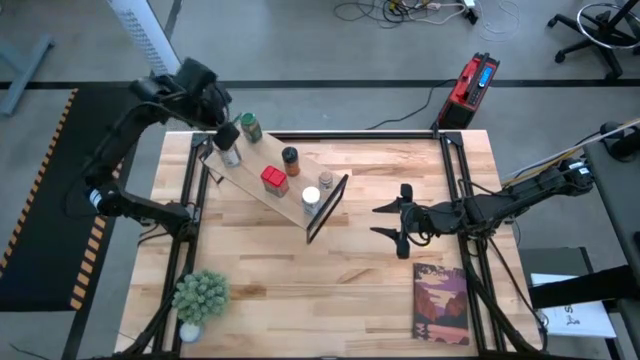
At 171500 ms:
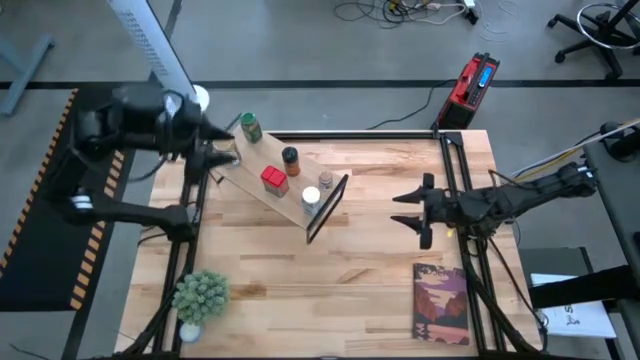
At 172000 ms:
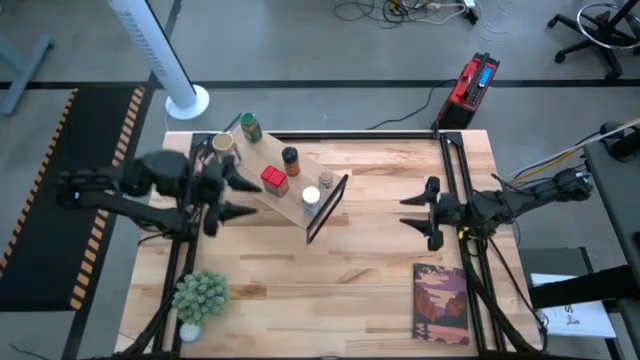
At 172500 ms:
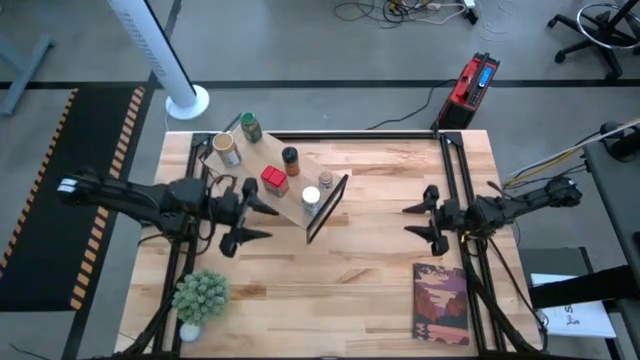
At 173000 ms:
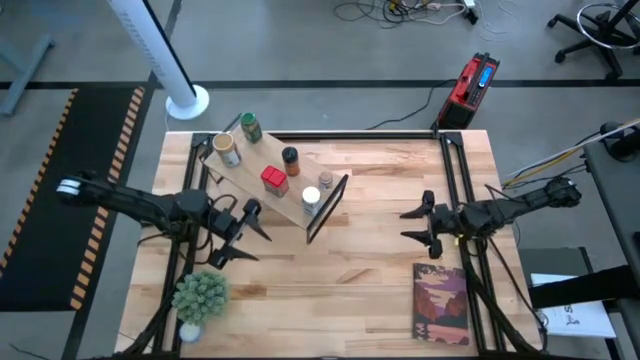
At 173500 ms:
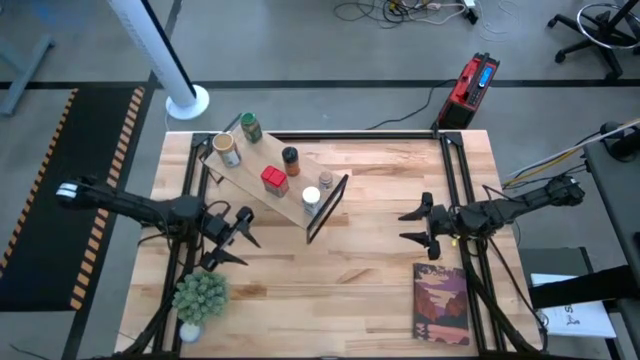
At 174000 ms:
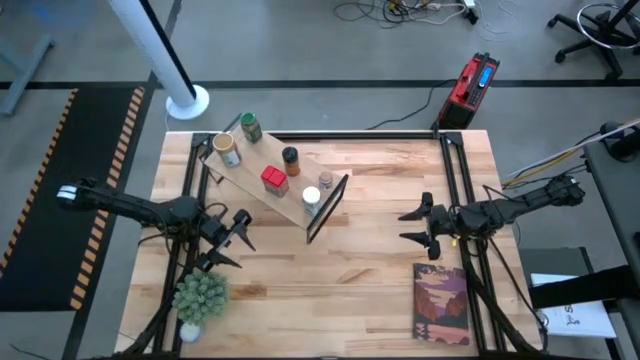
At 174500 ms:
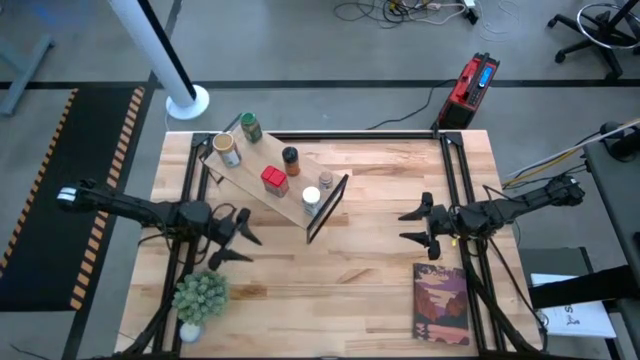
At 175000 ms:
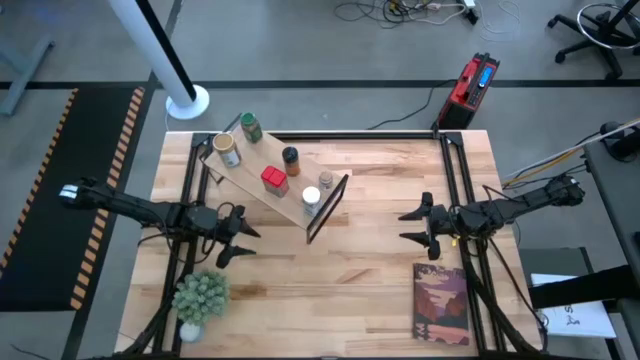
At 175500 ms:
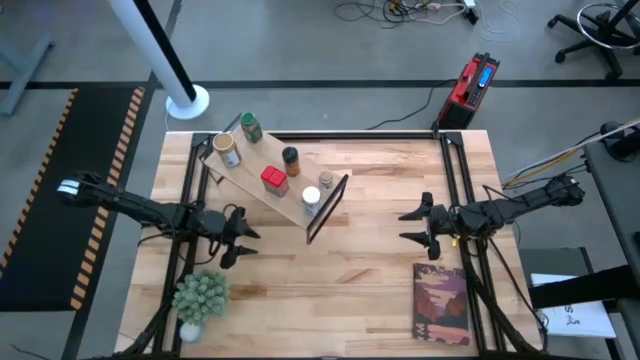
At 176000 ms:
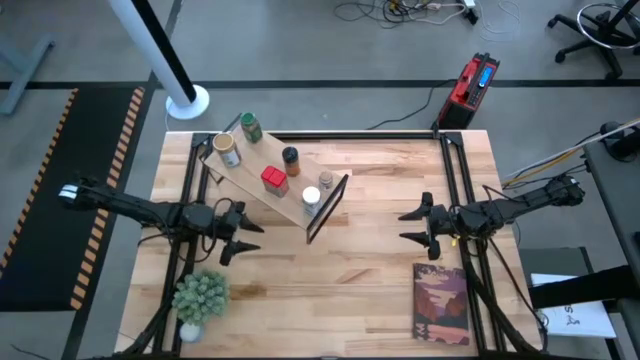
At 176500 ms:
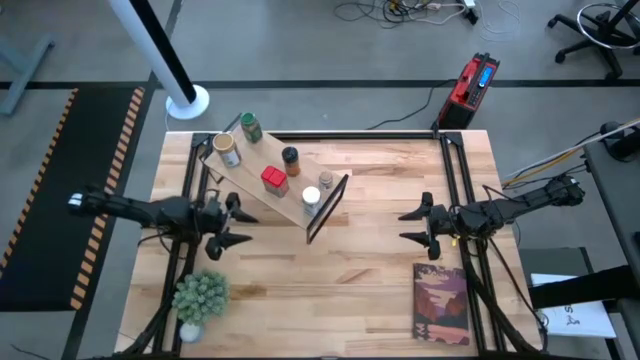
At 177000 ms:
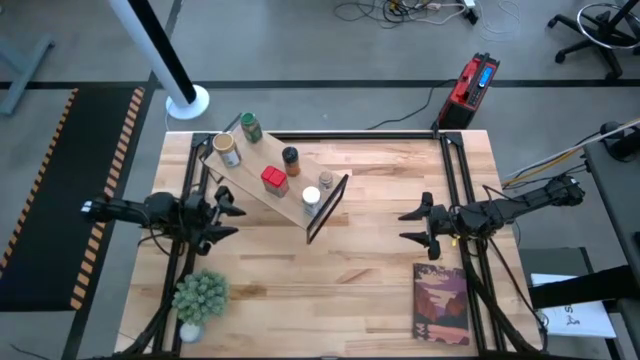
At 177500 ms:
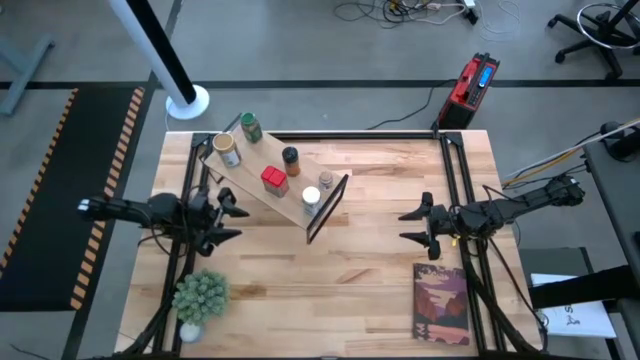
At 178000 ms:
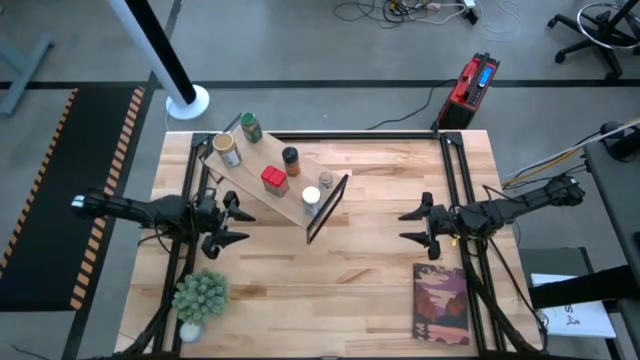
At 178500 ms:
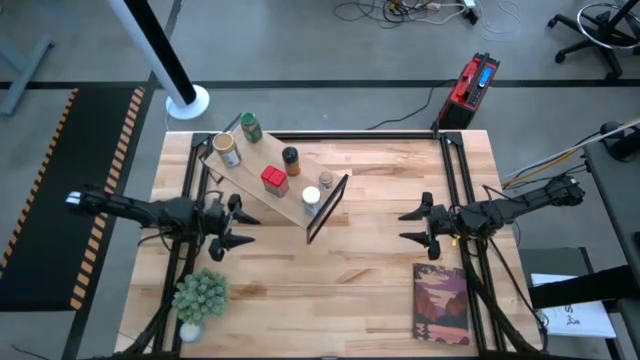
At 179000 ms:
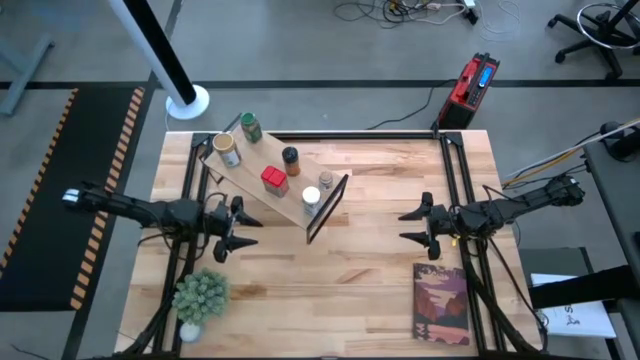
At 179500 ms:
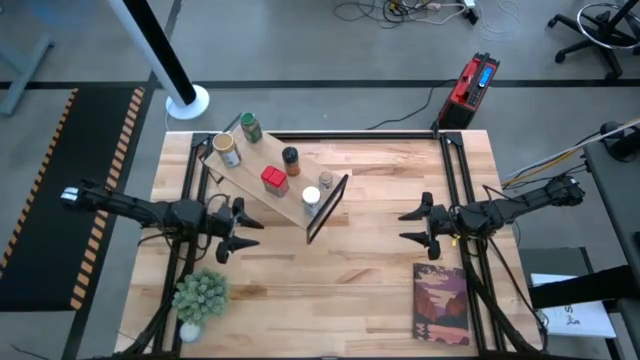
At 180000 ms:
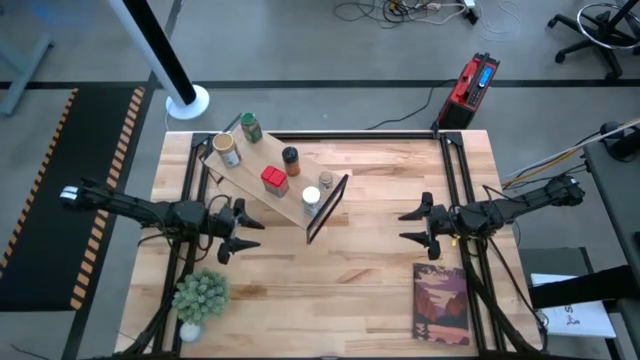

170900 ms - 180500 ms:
Task: Shelf spices
Return to Home Position

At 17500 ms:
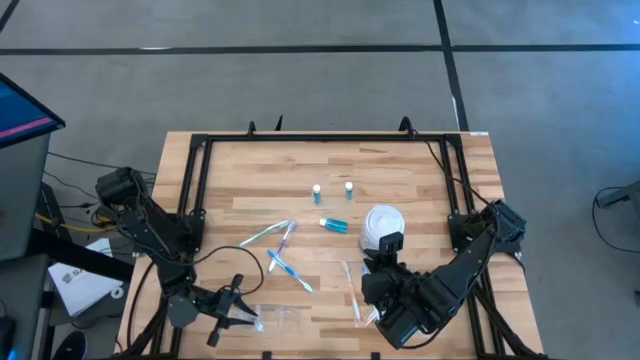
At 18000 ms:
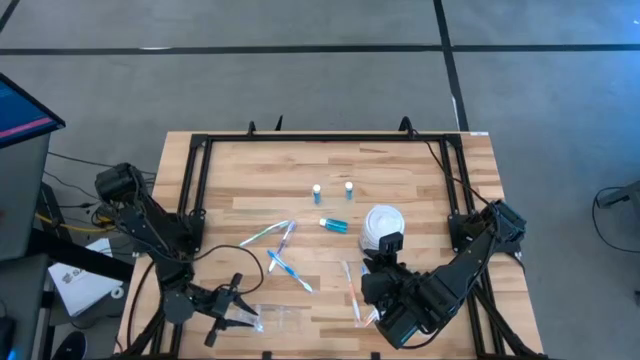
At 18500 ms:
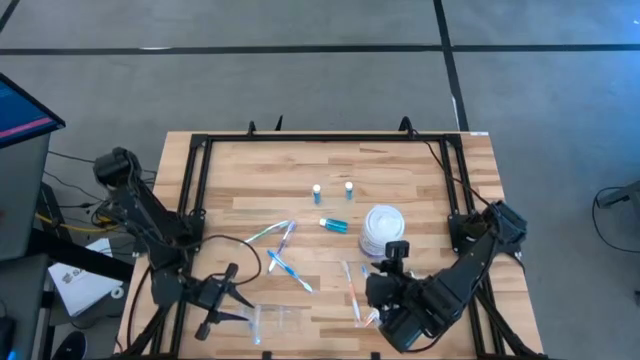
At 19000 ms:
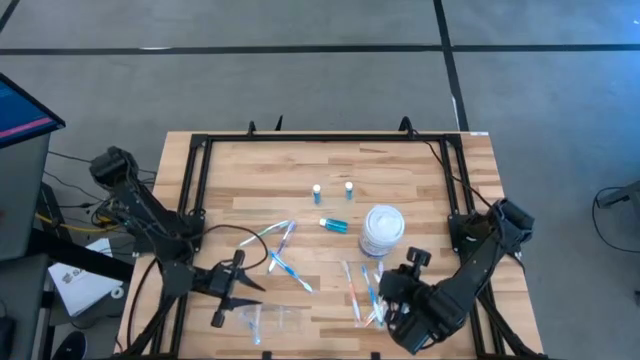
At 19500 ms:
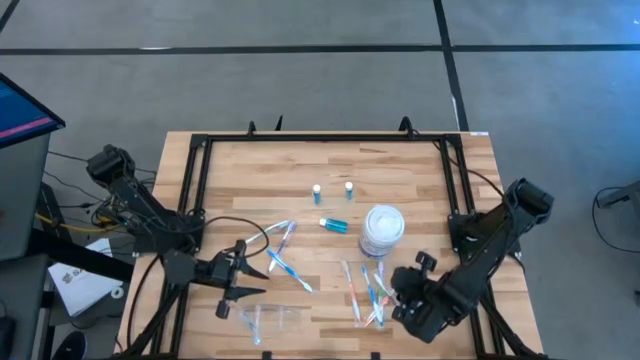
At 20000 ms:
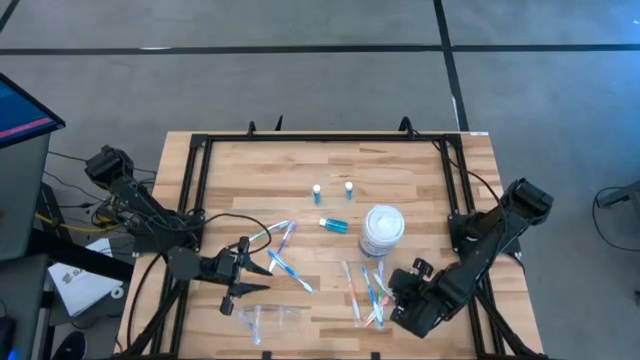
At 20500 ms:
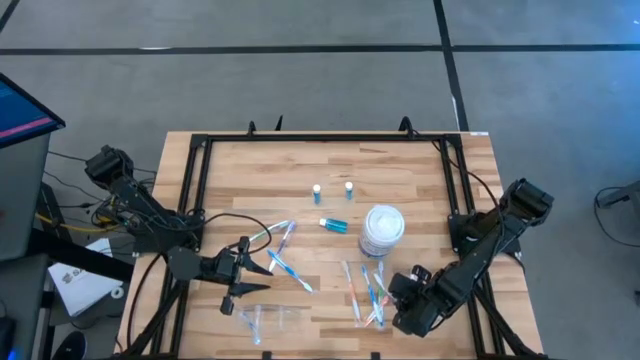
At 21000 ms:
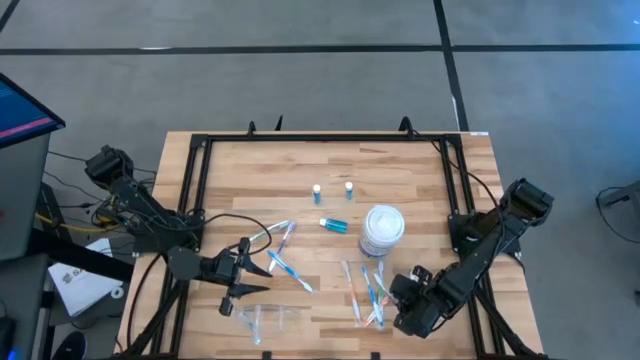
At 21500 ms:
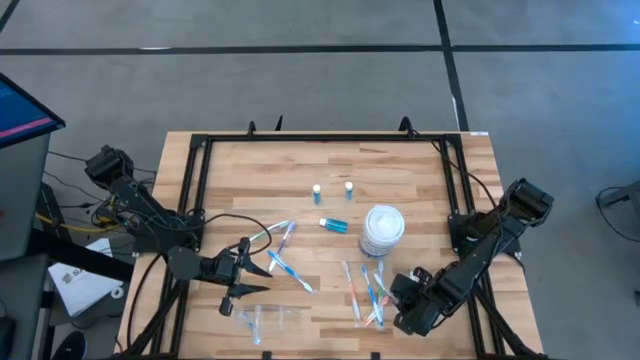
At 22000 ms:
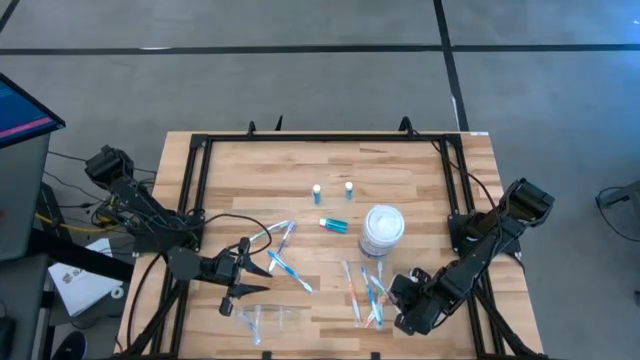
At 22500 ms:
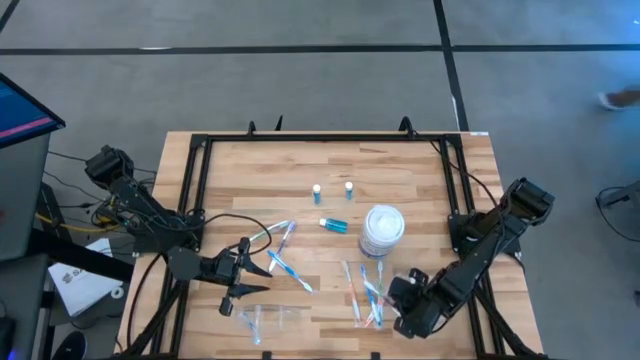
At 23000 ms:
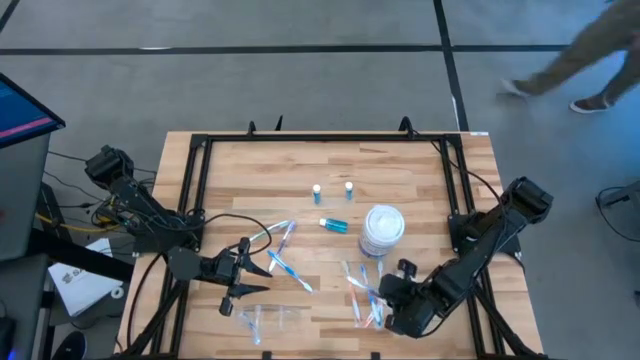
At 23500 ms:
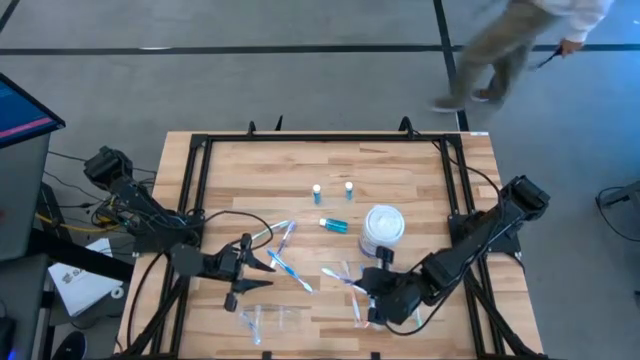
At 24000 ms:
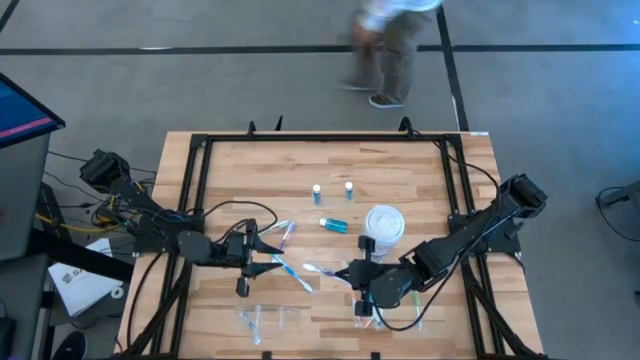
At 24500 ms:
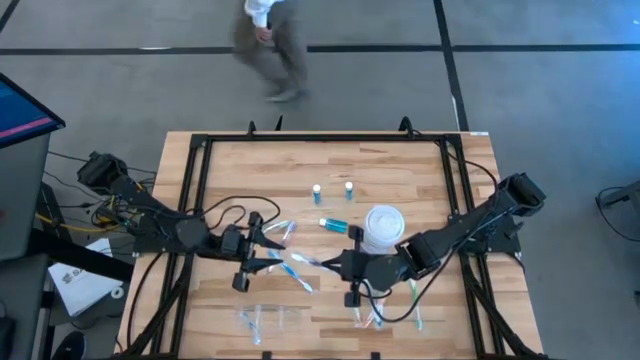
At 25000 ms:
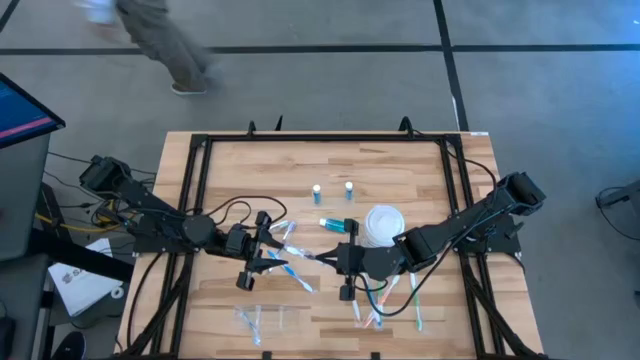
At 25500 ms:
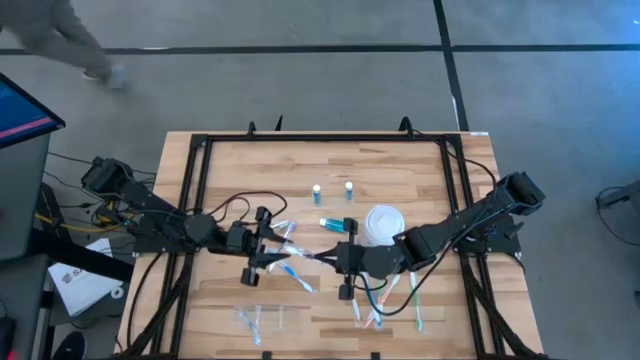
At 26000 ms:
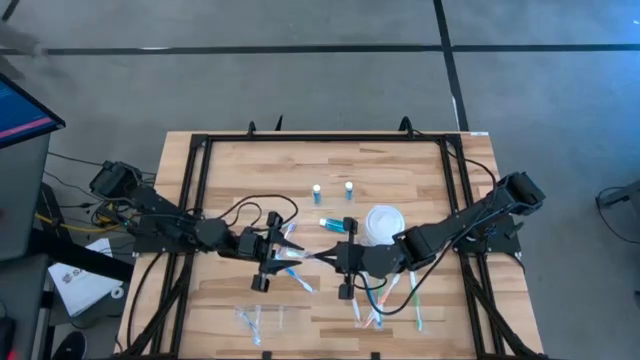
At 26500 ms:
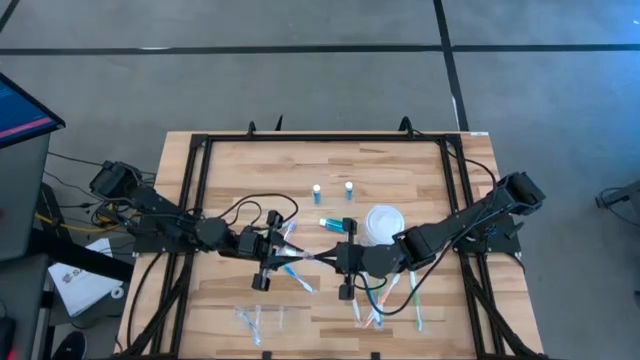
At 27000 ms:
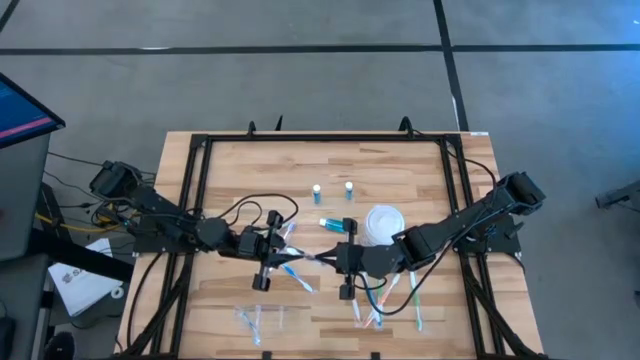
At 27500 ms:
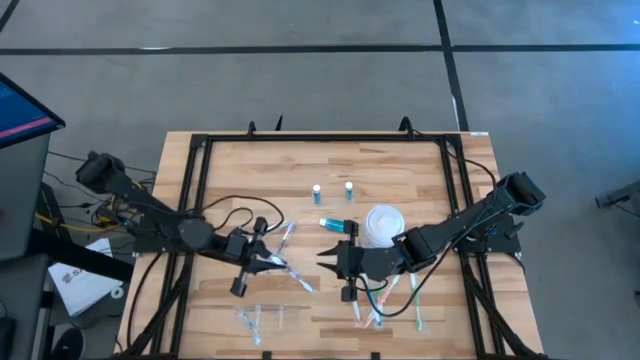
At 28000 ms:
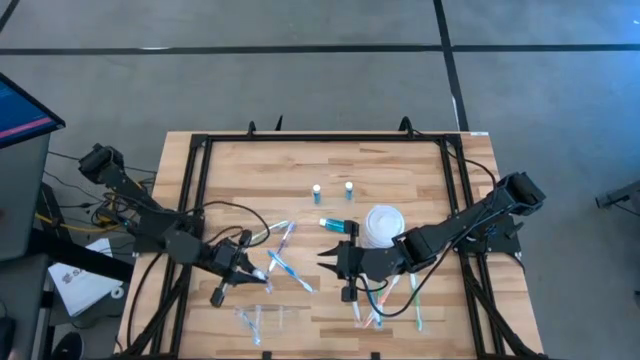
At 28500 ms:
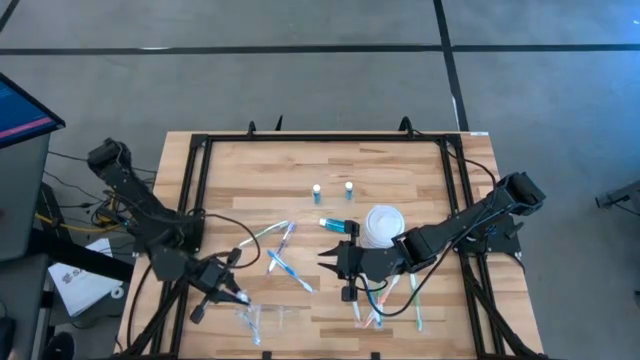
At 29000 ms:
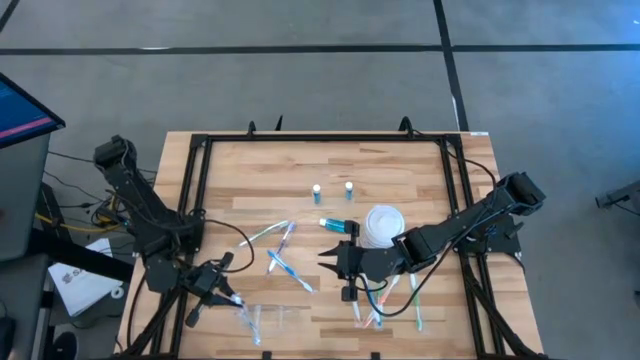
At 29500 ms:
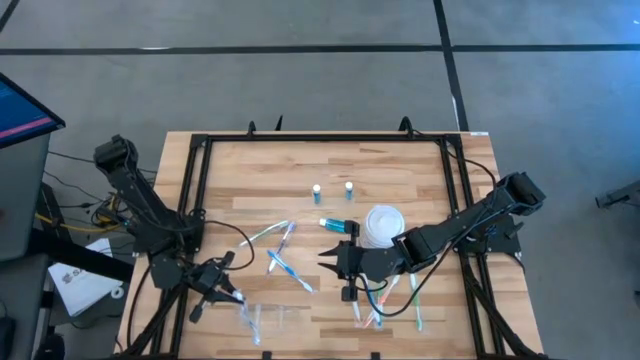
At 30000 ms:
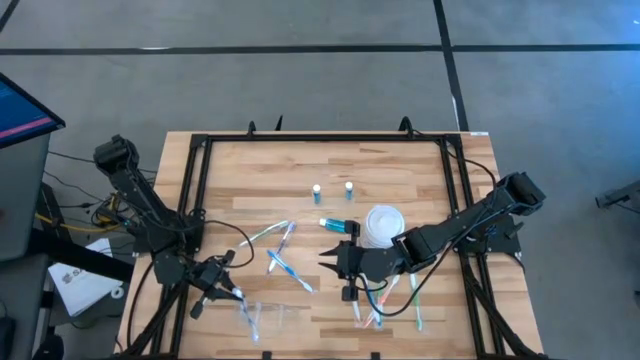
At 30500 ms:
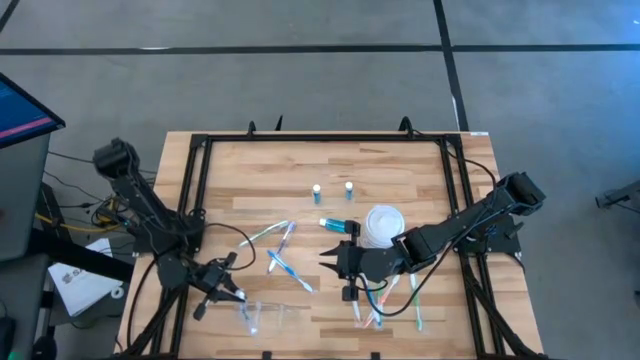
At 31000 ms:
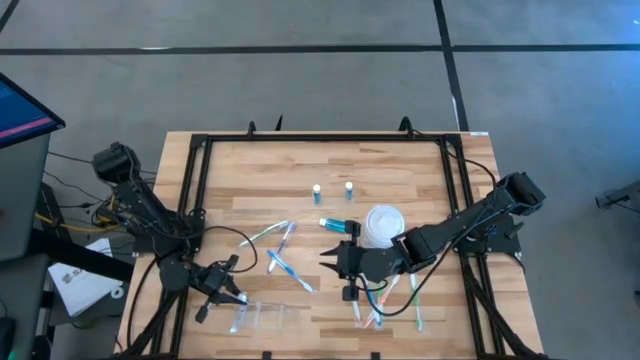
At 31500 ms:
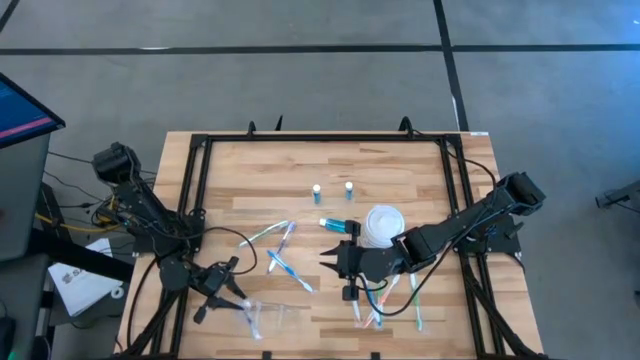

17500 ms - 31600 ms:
Task: Pick & Place toothbrushing station
Put the right purple toothbrush into the transparent organizer
